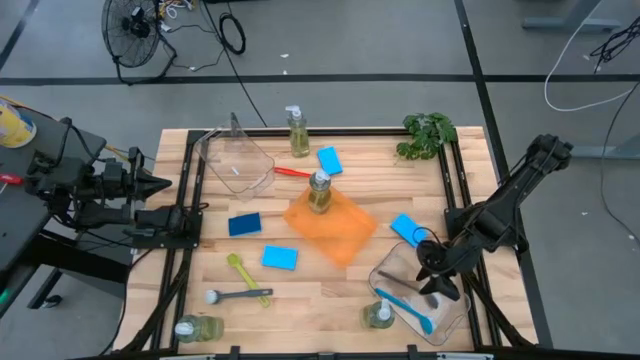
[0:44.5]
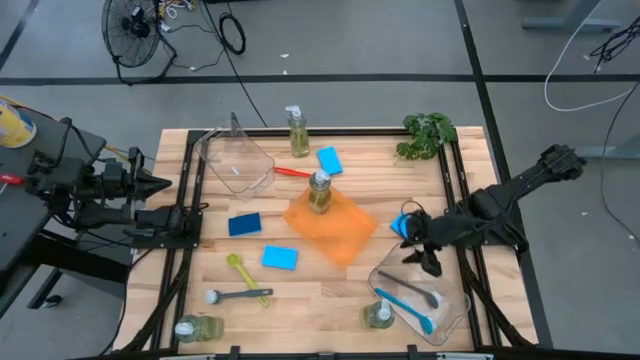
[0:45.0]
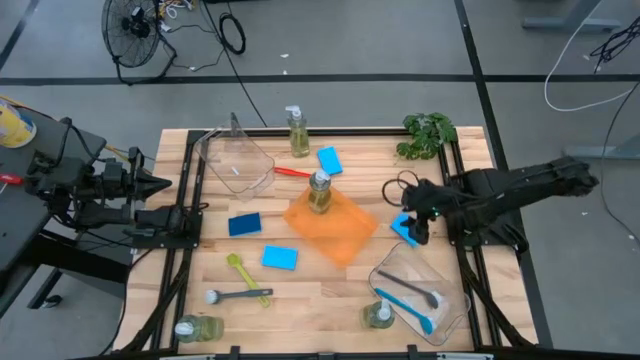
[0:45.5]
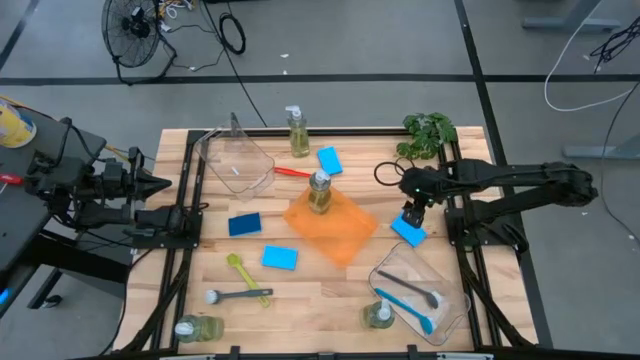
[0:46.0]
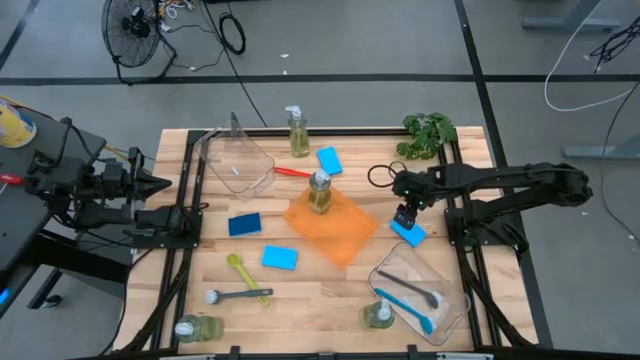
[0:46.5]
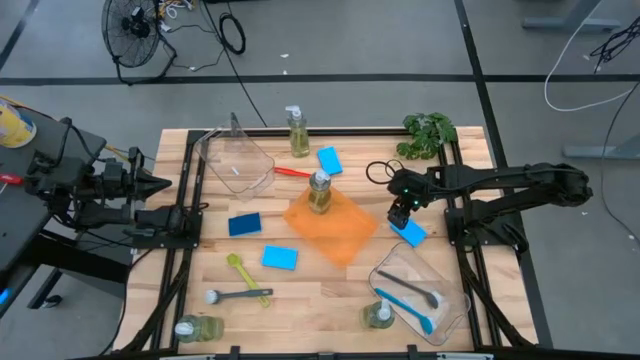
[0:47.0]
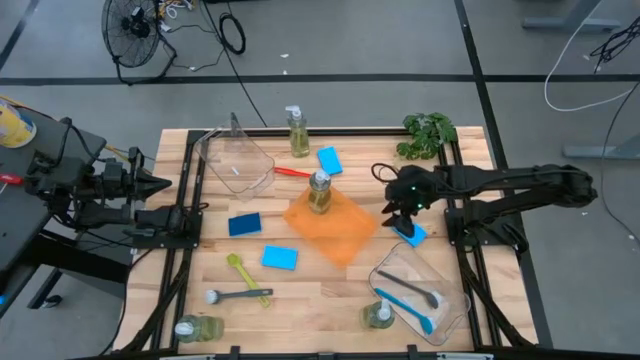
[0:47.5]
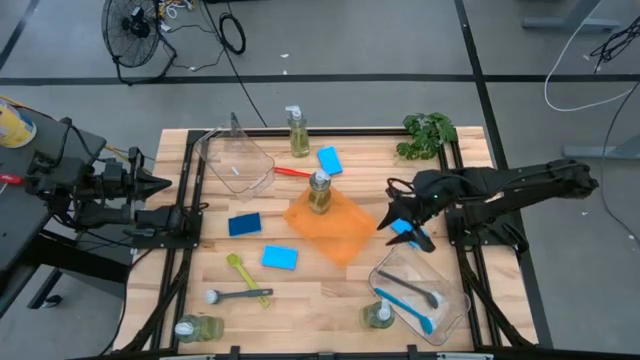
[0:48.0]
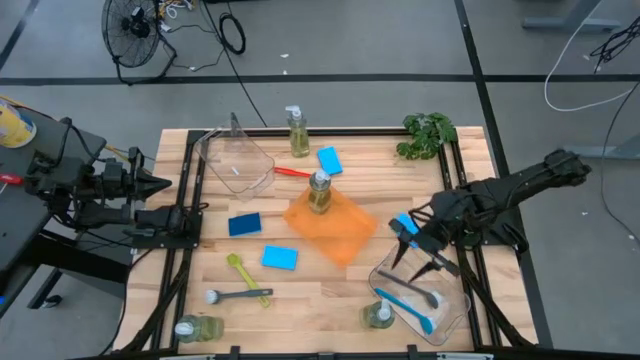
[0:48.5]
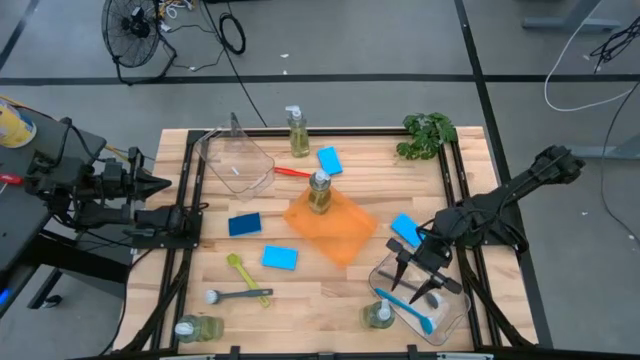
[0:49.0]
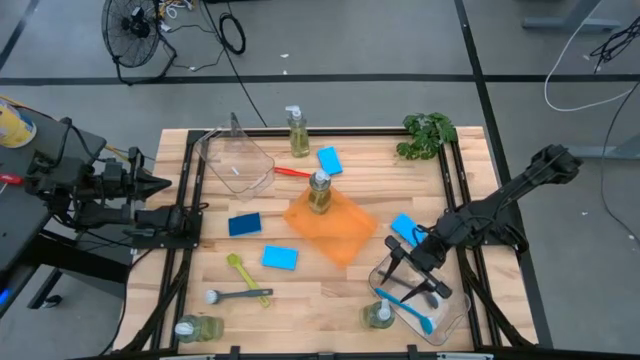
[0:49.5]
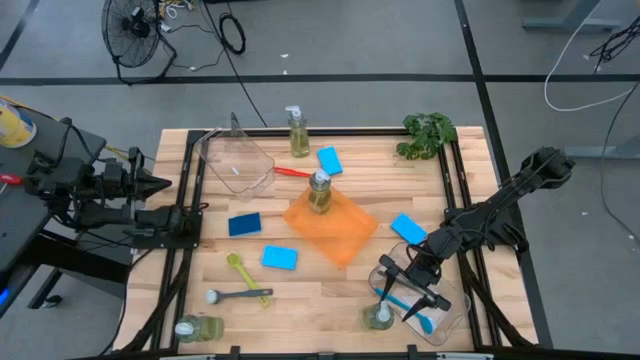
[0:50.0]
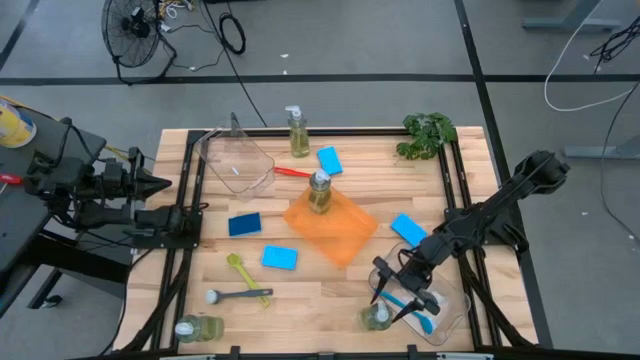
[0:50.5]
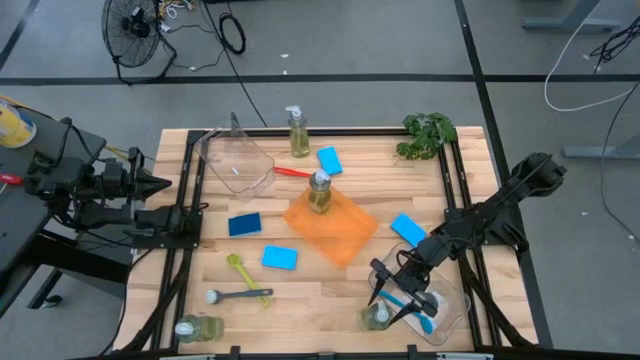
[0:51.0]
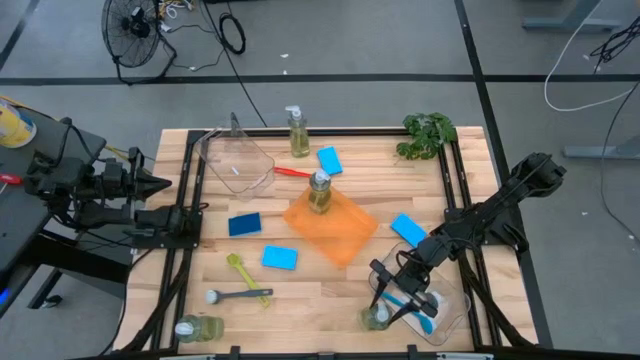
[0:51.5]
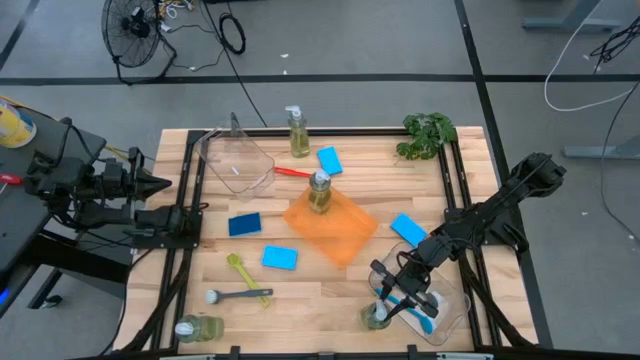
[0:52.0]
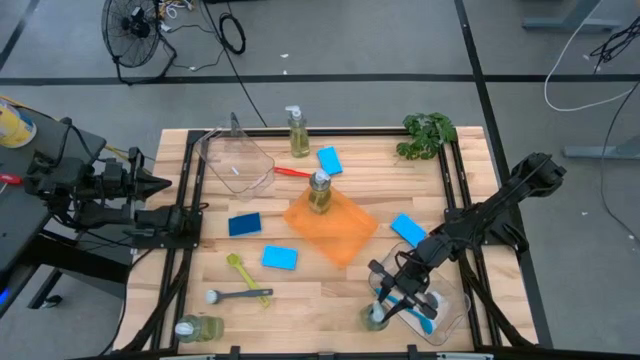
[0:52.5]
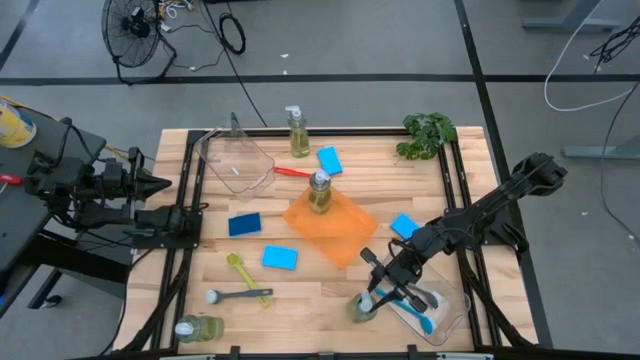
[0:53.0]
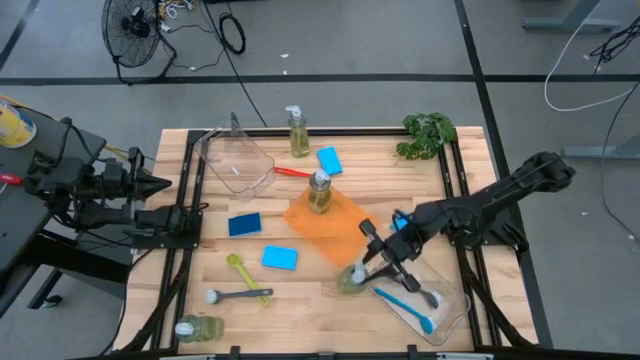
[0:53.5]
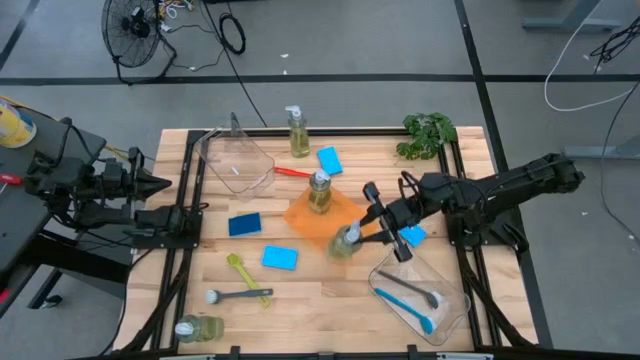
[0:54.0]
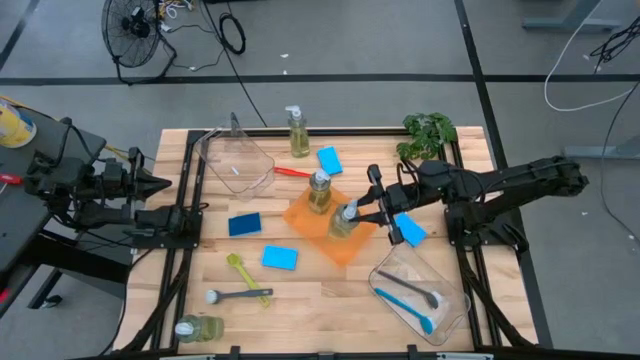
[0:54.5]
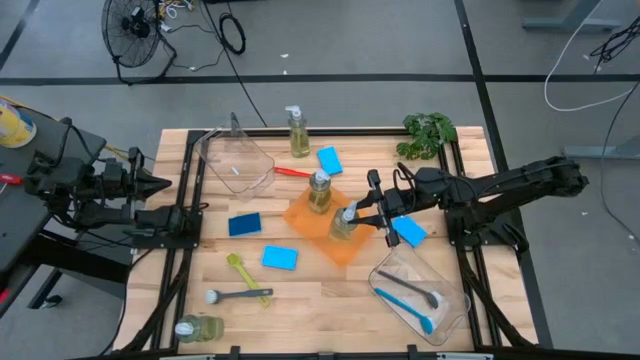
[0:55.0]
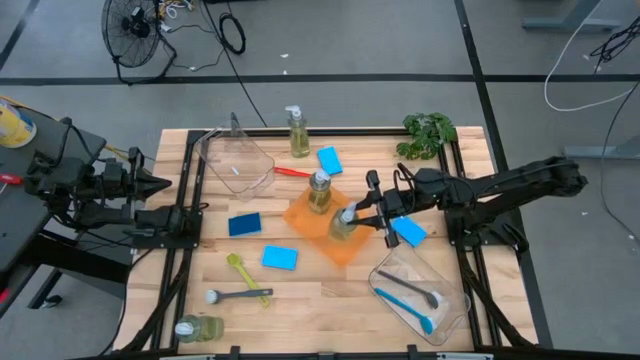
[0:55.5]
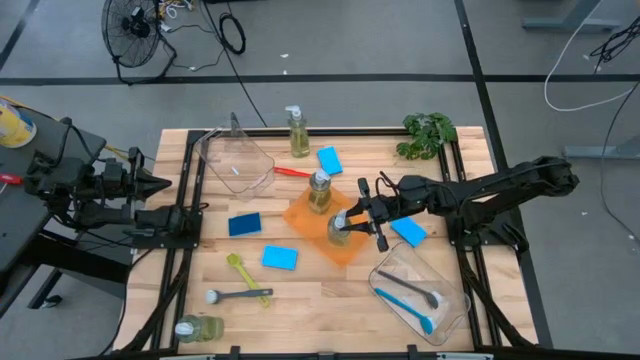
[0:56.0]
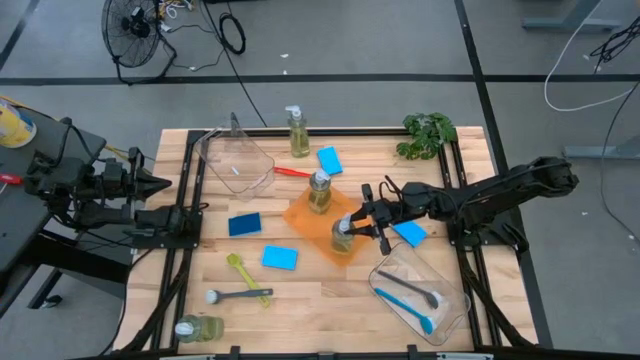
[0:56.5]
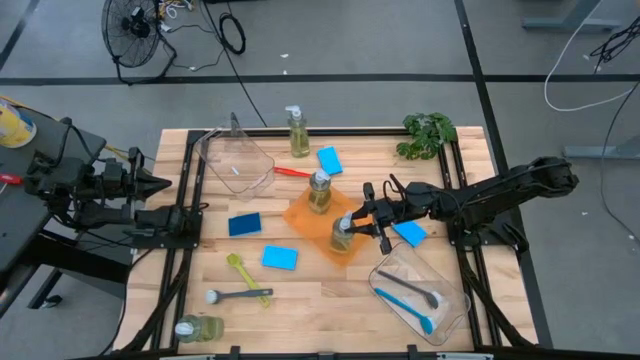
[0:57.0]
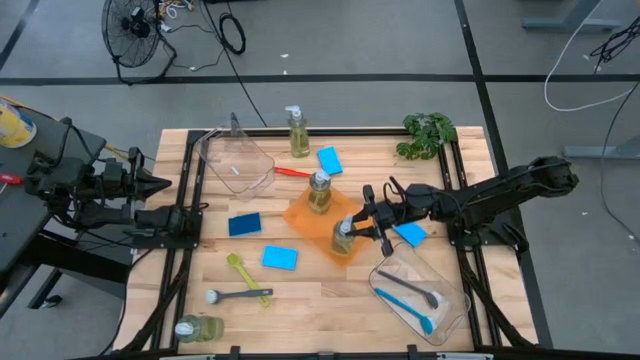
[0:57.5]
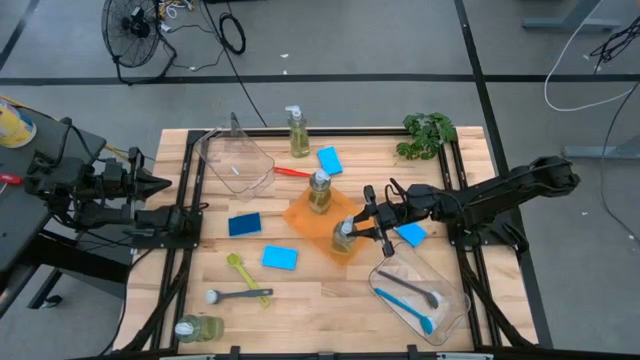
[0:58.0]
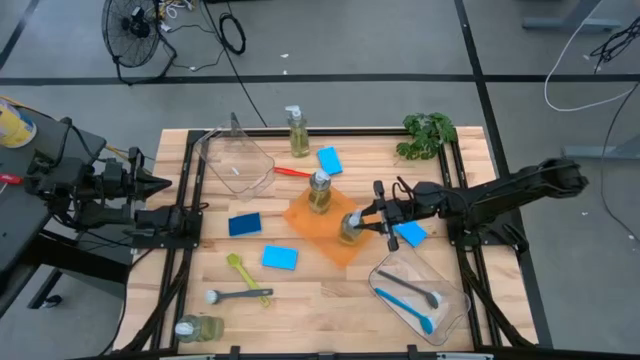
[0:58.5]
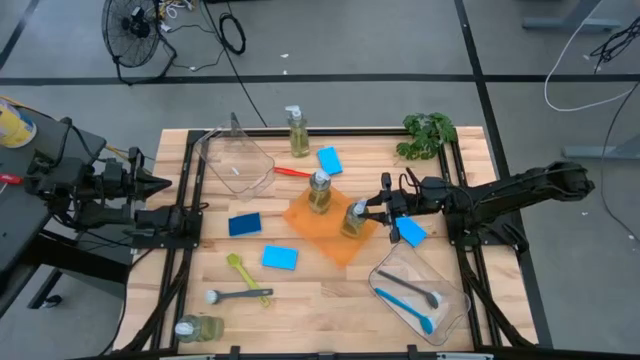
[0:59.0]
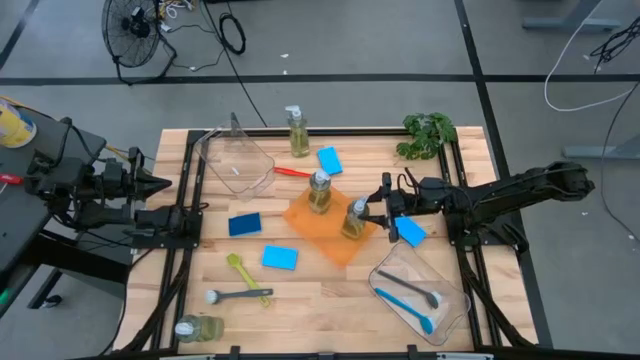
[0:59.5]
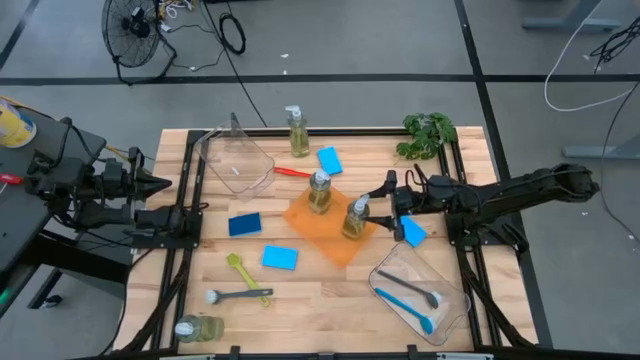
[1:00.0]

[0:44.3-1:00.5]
Task: Pick & Place Kitchen Sink Supplies
Put the yellow dish soap into the orange bin

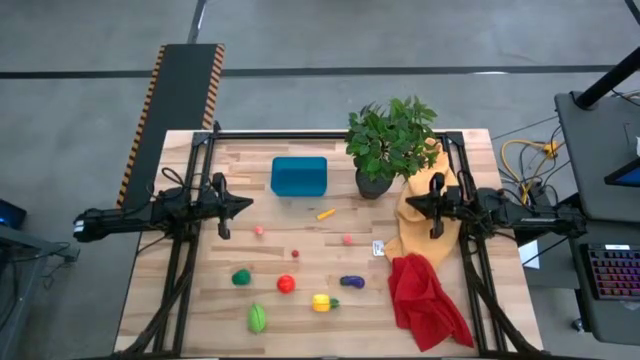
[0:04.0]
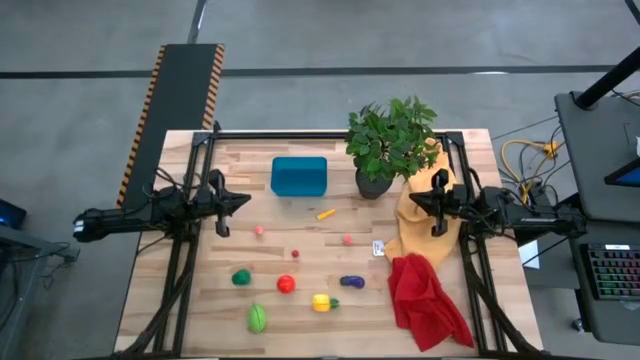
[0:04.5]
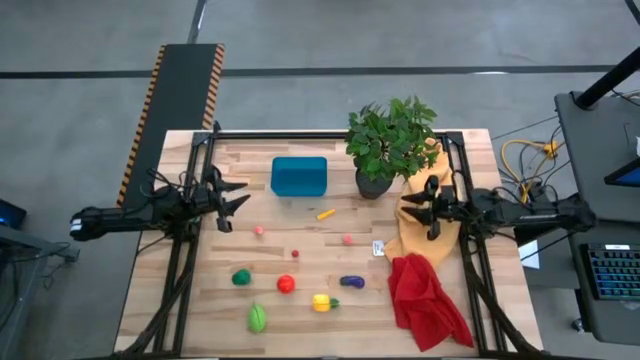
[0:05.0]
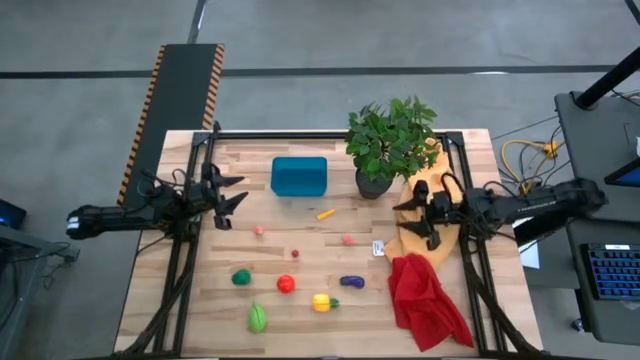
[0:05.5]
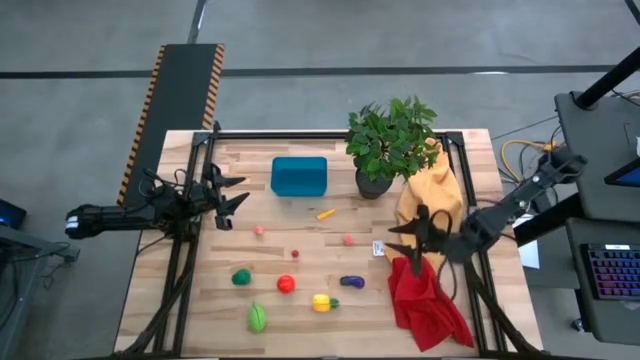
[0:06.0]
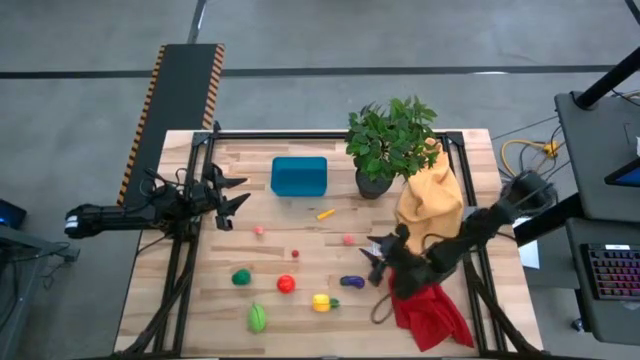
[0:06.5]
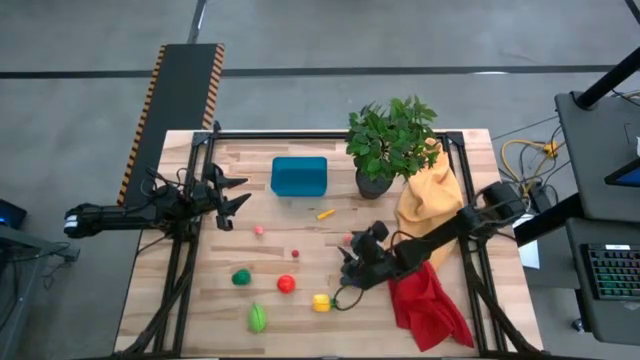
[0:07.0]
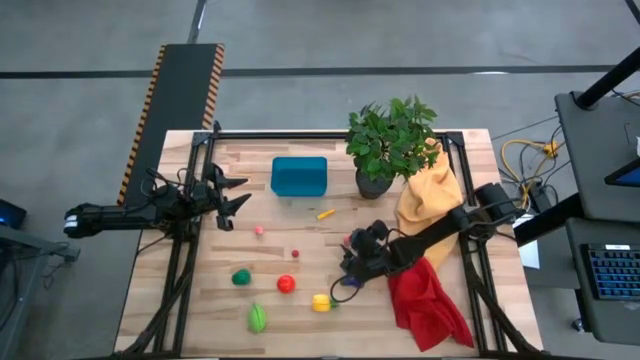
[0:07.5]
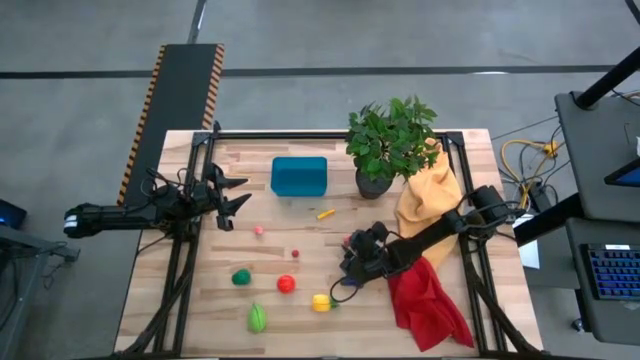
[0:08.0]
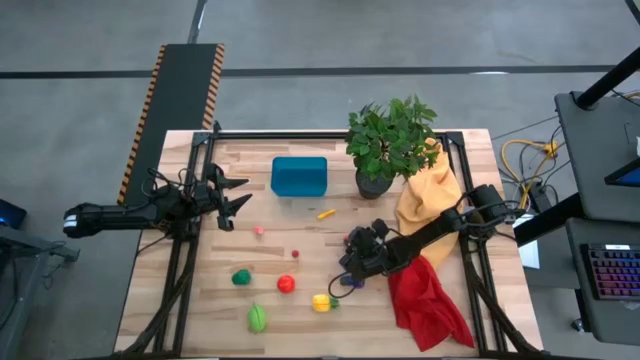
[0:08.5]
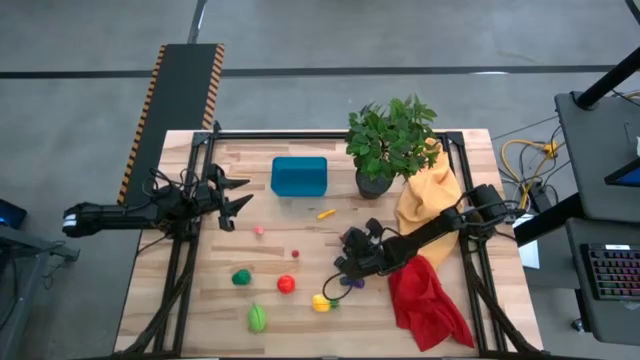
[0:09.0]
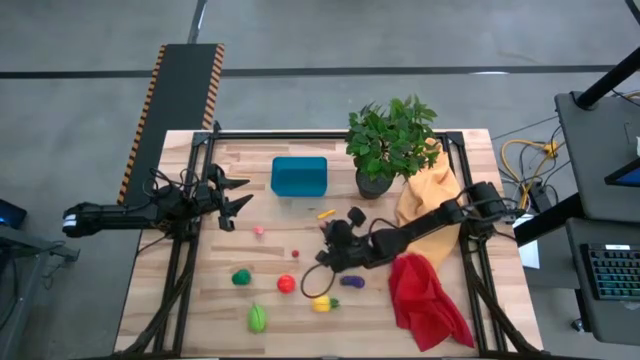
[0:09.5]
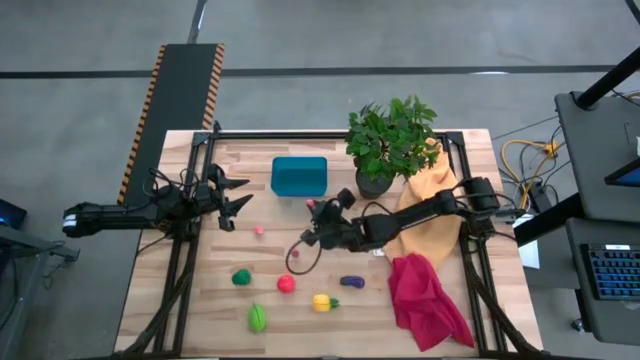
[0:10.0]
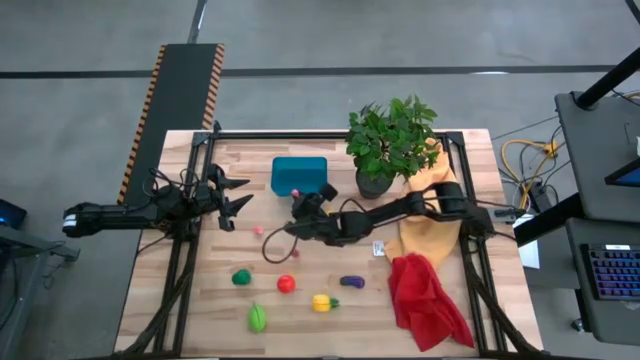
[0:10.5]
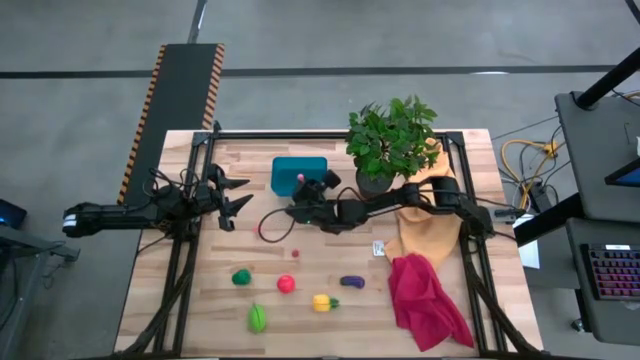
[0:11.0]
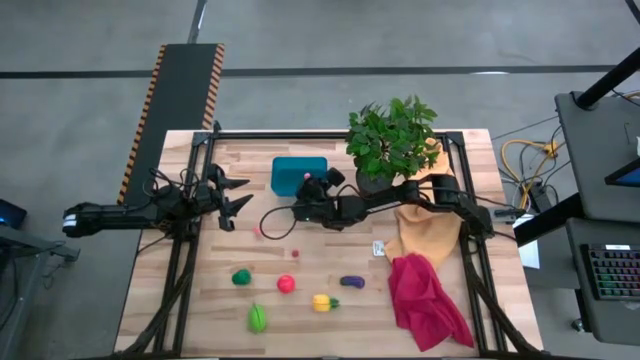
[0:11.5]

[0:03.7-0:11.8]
Task: Pick and placing Produce into tupperware
Put the right peach into the bin
